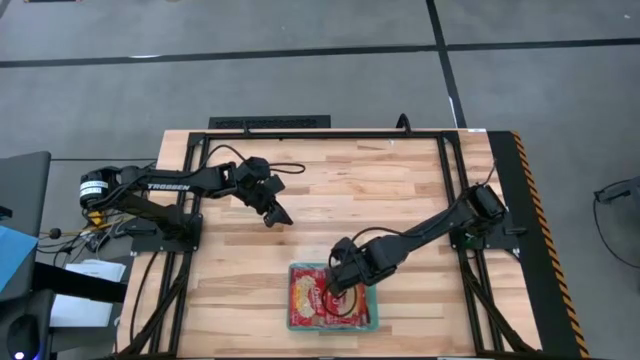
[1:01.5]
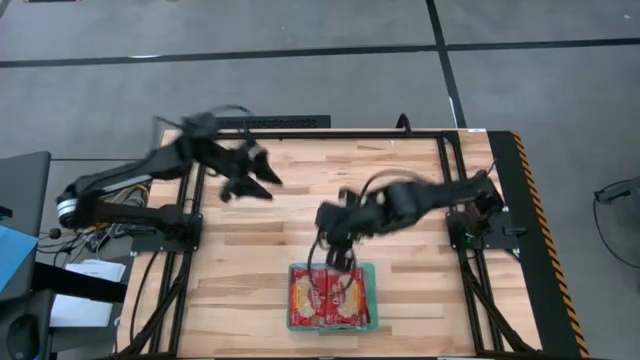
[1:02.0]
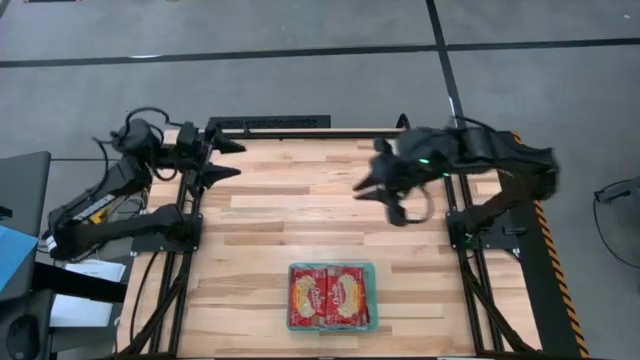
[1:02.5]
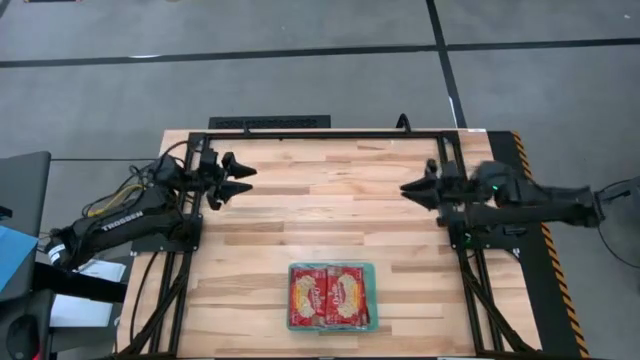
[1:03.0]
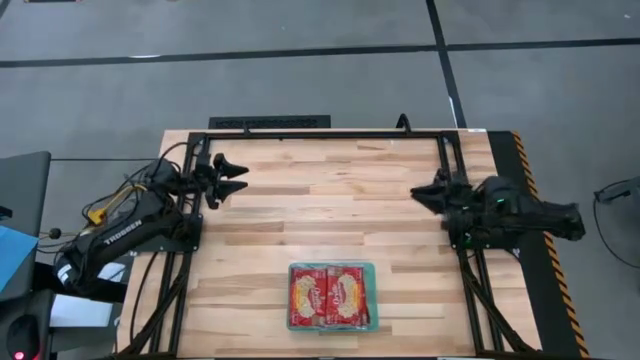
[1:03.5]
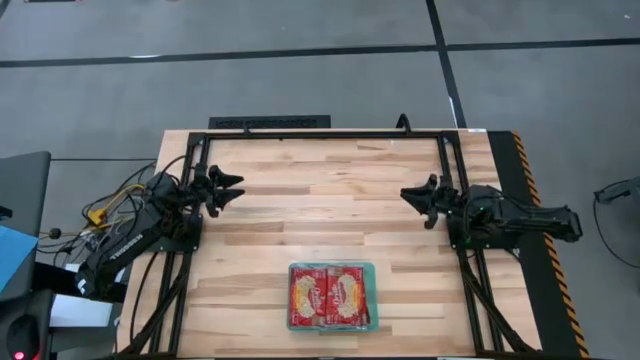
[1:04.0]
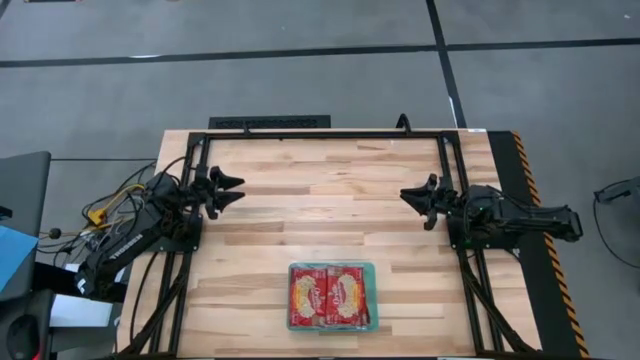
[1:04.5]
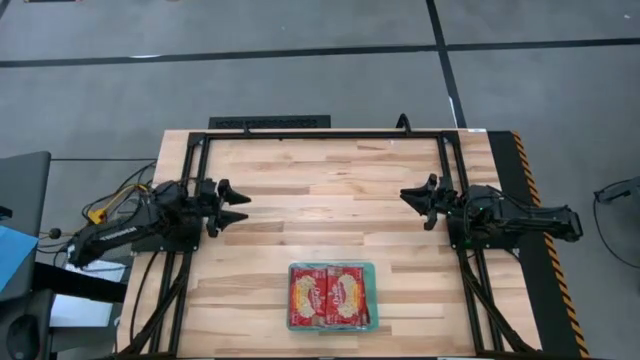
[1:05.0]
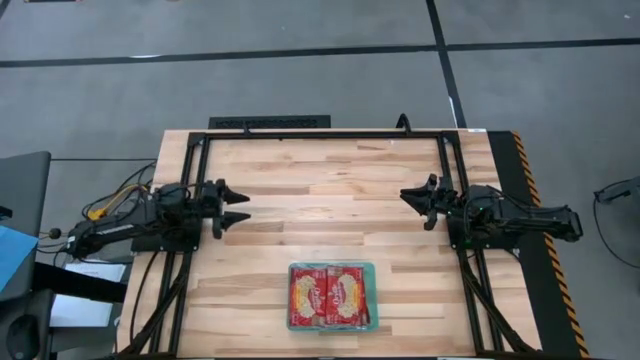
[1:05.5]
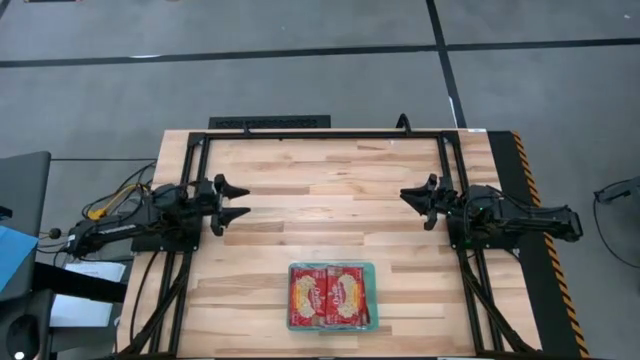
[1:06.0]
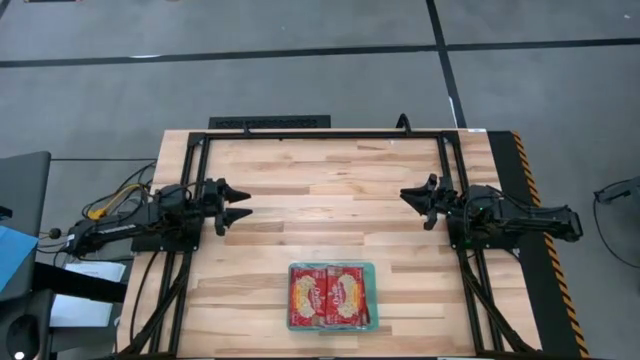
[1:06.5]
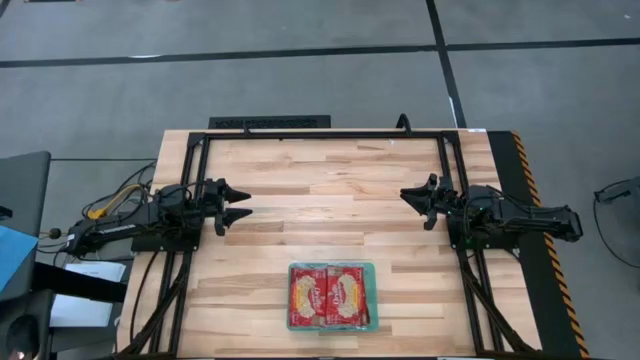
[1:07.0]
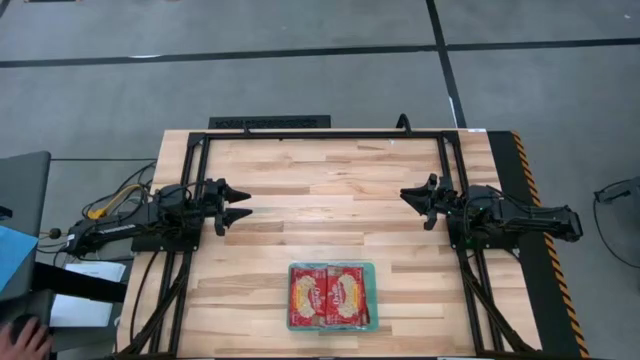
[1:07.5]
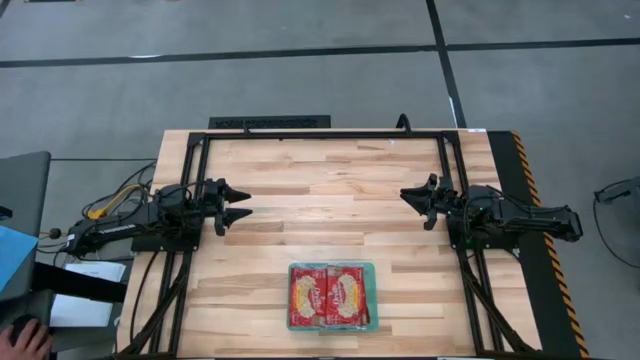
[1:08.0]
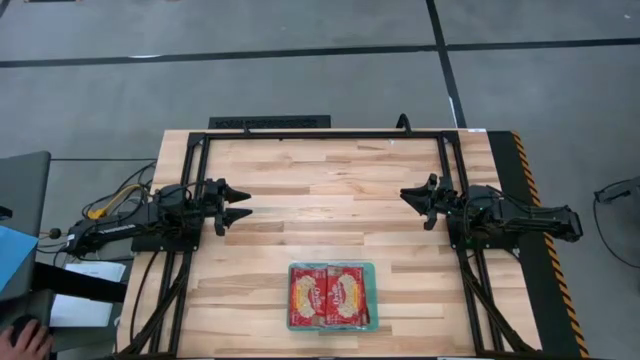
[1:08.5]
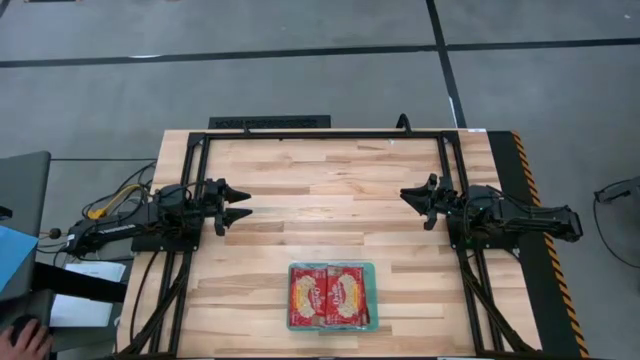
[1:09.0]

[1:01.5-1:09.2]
Task: Sort popcorn bags into baskets
Return to Home Position

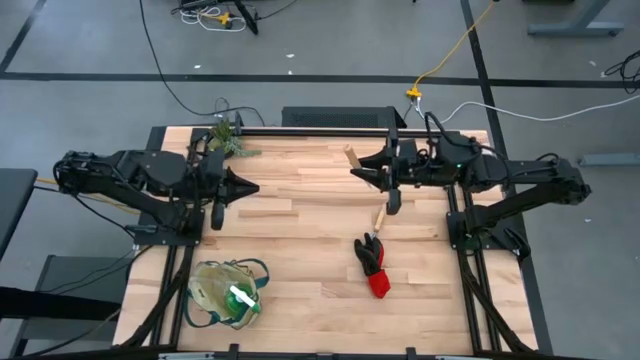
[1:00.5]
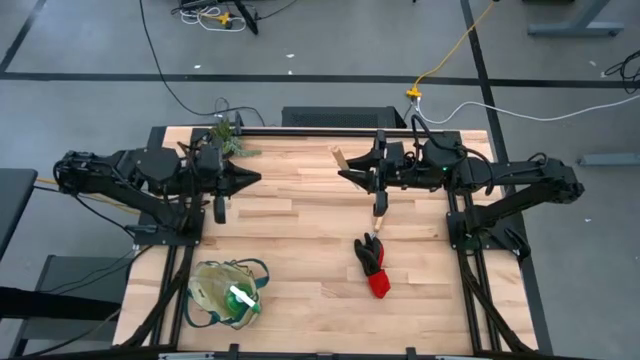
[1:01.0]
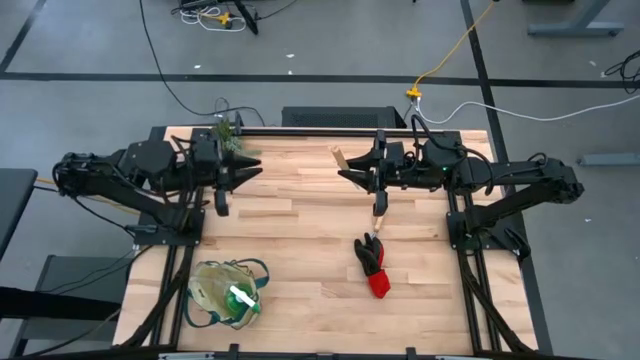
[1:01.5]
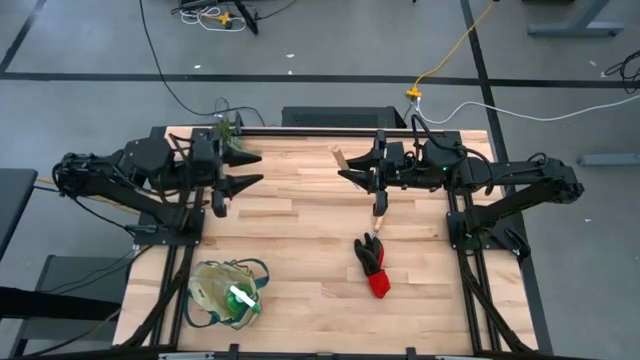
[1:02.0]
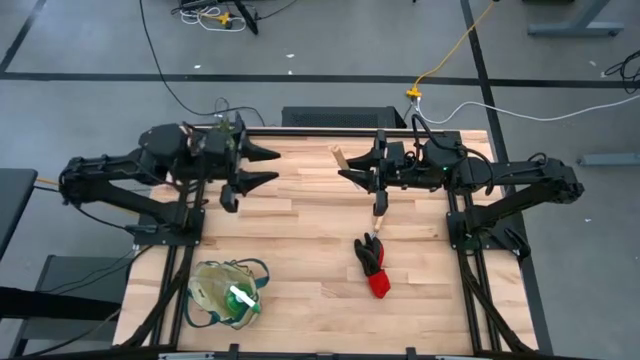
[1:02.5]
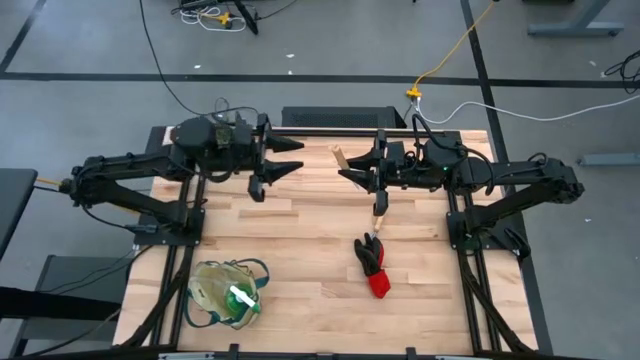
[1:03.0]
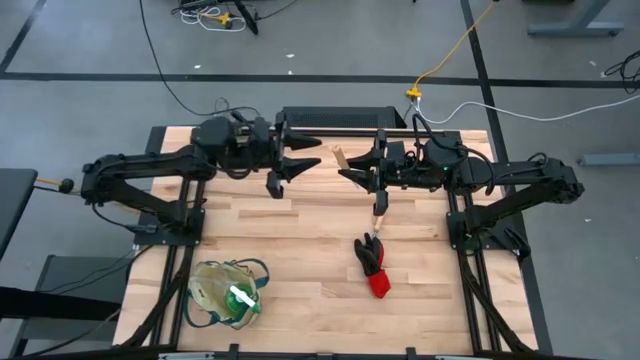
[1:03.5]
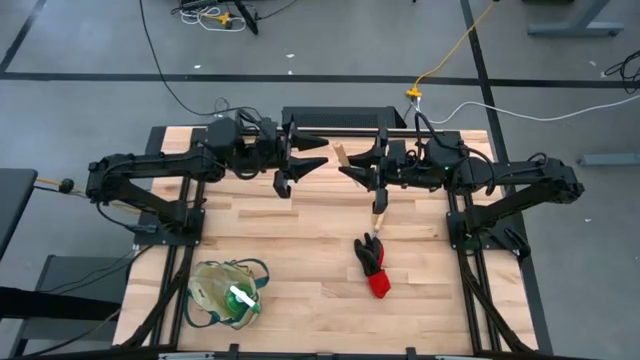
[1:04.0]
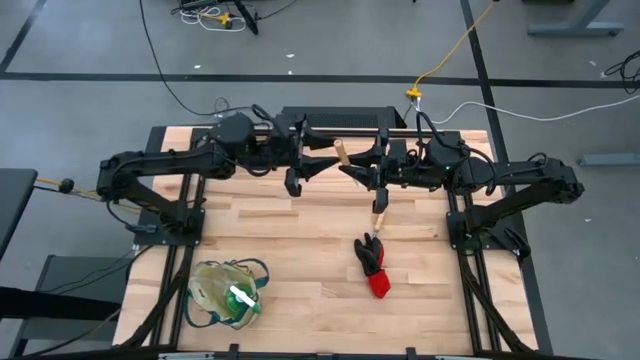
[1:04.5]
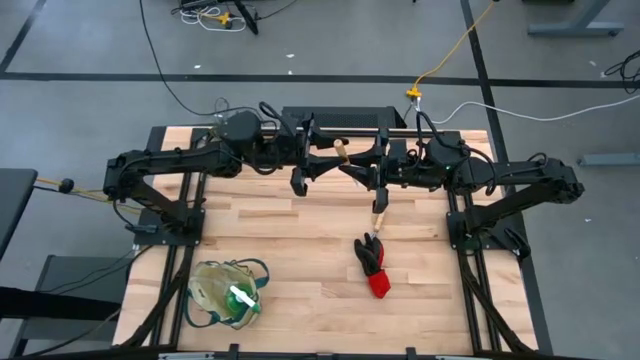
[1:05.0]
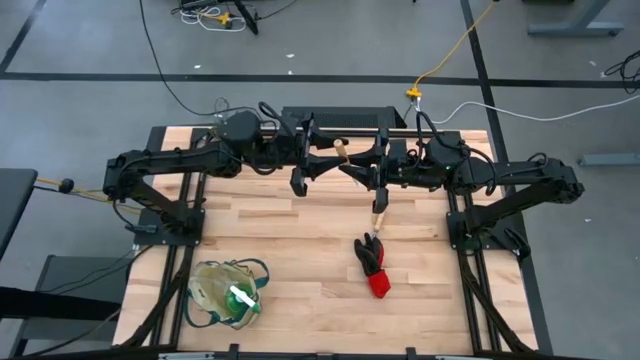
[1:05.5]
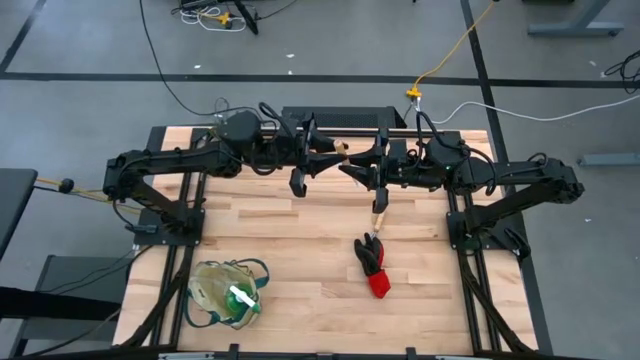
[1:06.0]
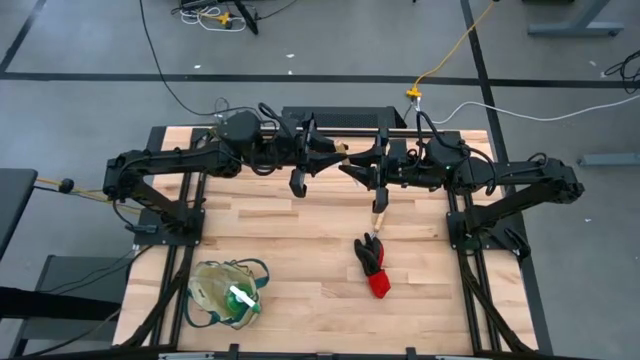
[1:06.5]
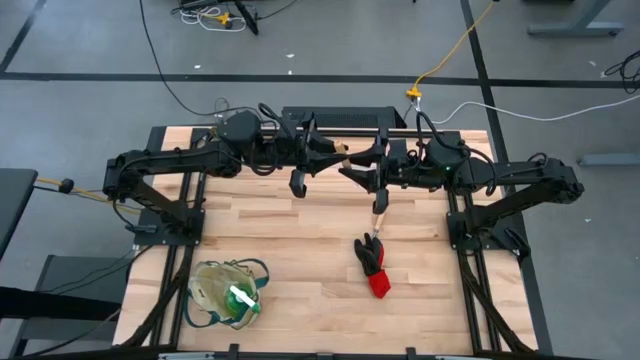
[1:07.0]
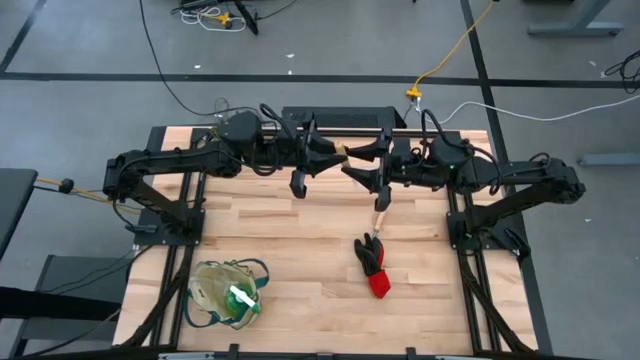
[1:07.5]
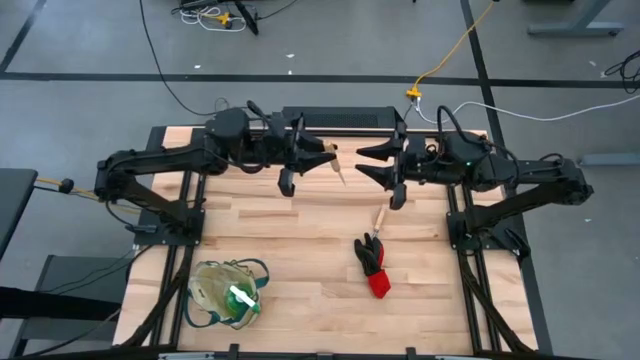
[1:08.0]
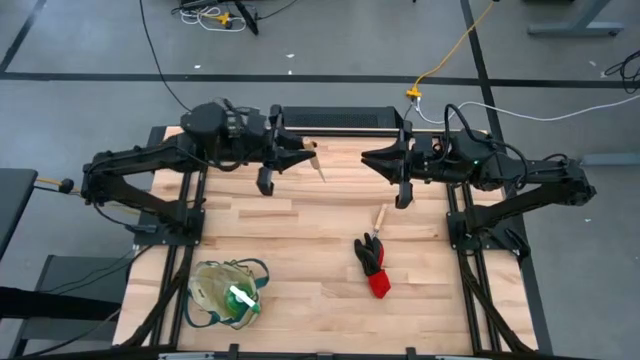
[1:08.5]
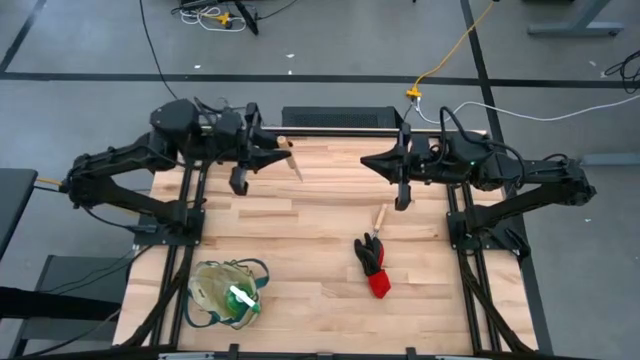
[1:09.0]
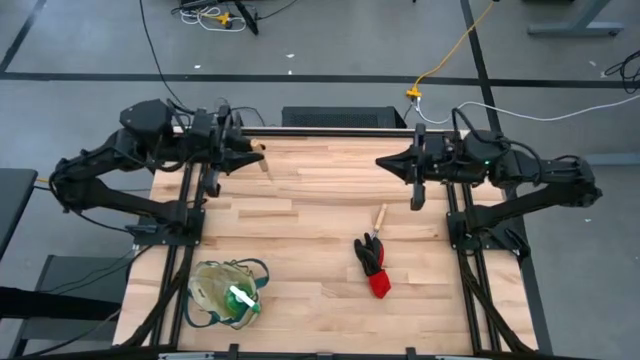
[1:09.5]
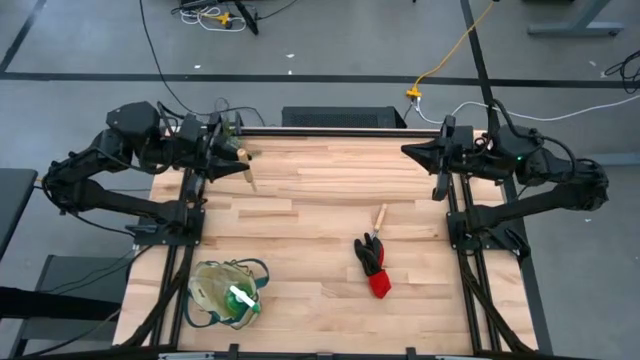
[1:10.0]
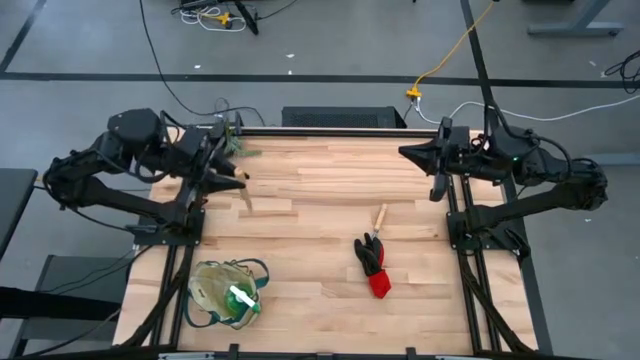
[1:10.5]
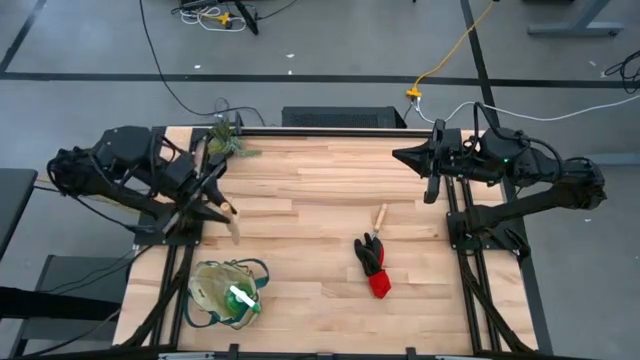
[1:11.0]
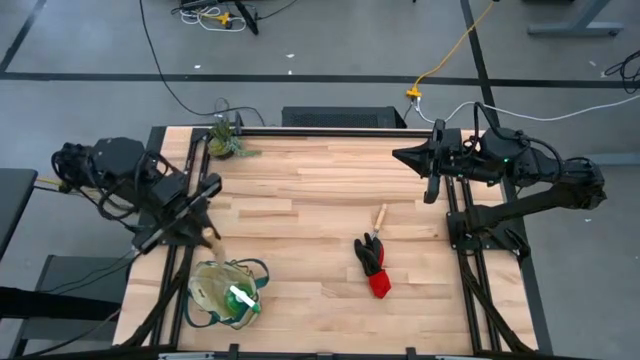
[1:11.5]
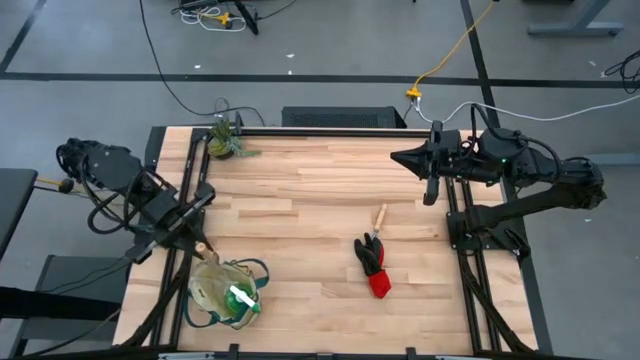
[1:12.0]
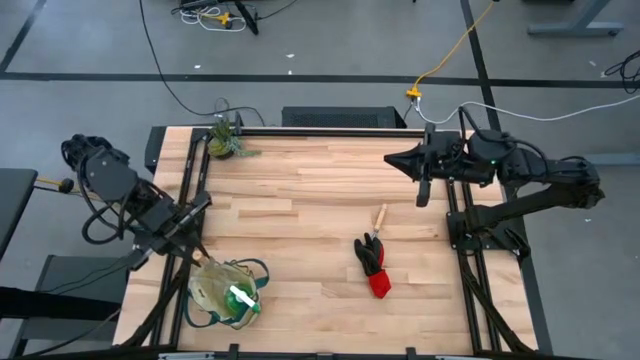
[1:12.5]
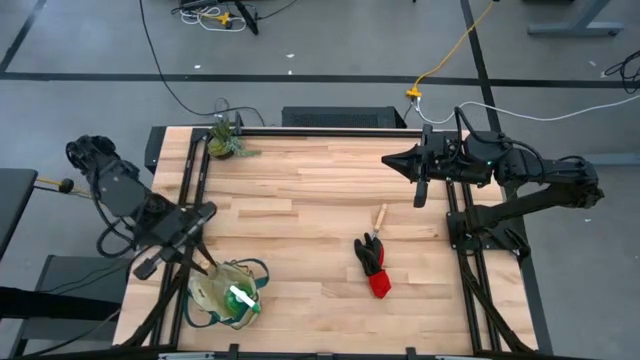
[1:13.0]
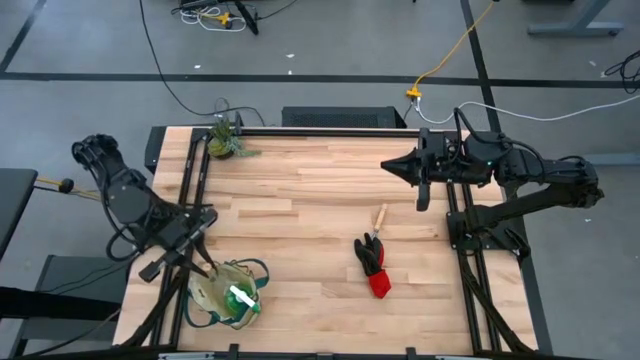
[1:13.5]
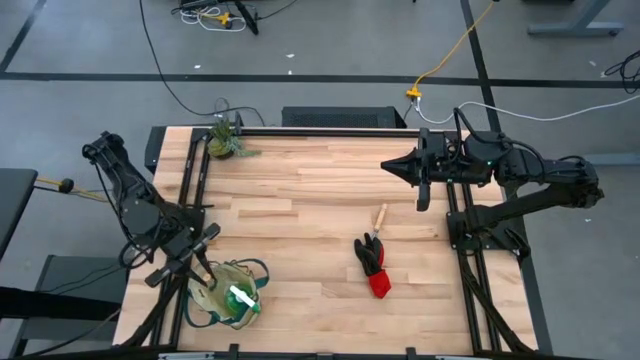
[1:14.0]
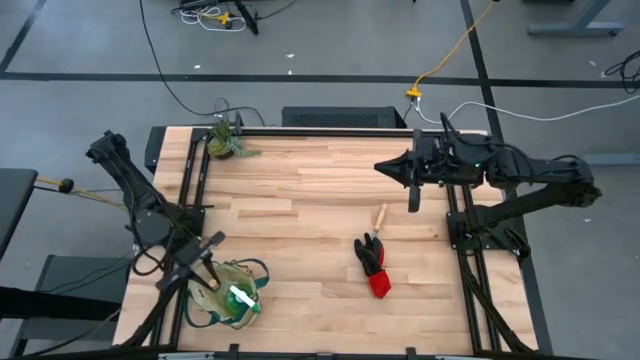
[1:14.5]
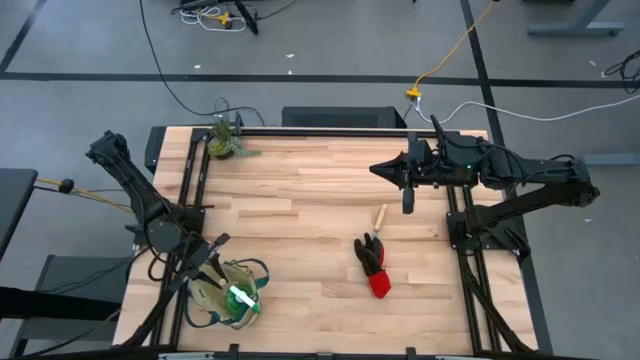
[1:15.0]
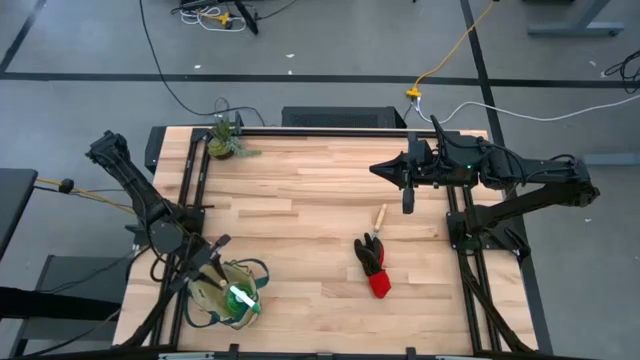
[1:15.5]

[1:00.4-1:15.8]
Task: Pick & Place Garden tools in Gardening bag
Put the brown trowel into the white gardening bag
